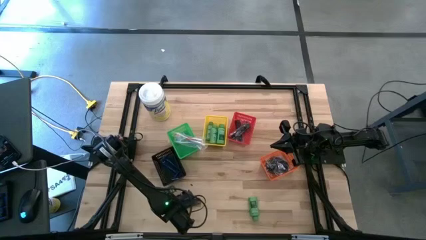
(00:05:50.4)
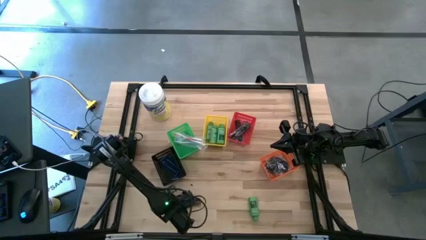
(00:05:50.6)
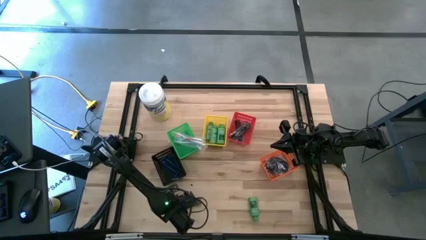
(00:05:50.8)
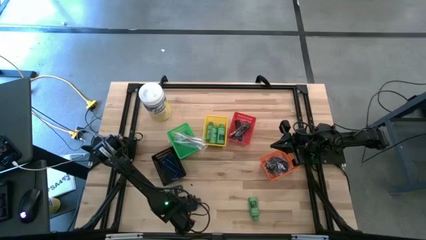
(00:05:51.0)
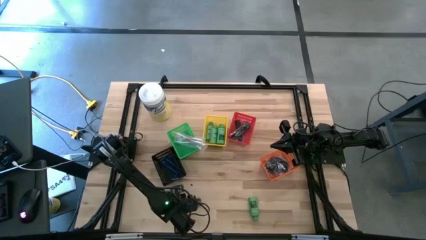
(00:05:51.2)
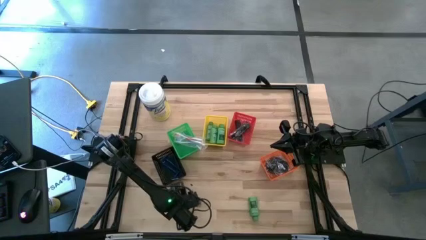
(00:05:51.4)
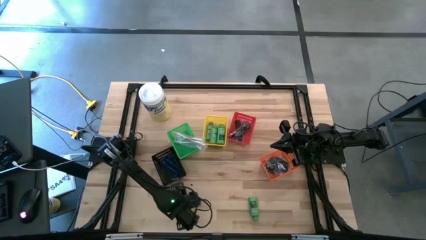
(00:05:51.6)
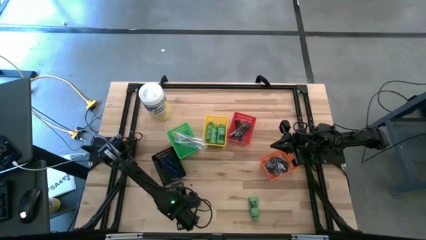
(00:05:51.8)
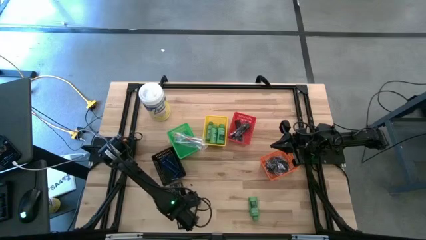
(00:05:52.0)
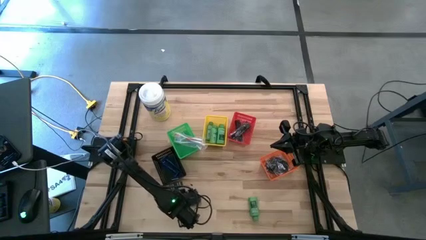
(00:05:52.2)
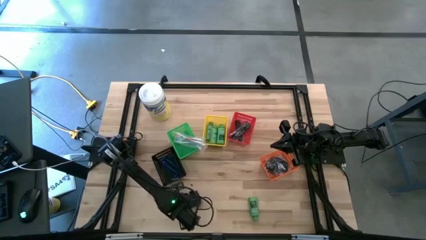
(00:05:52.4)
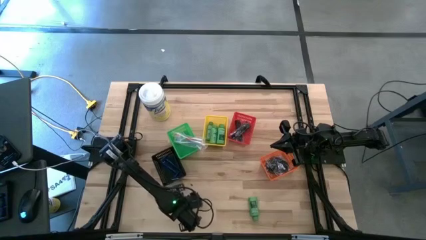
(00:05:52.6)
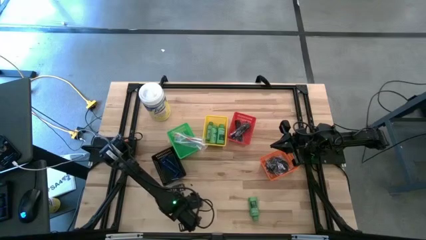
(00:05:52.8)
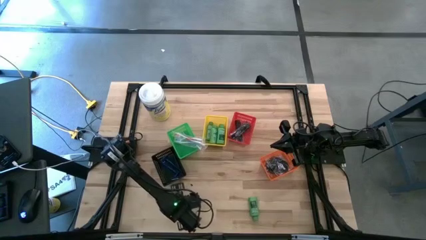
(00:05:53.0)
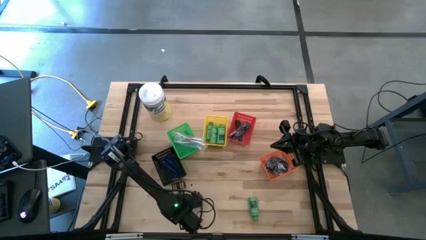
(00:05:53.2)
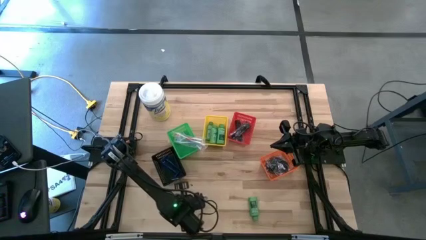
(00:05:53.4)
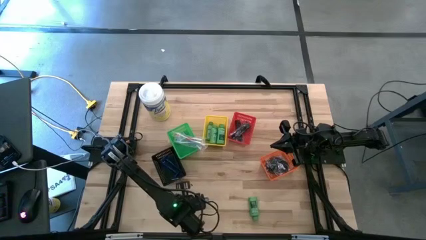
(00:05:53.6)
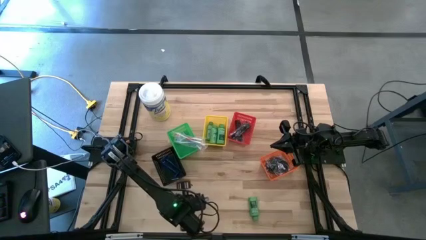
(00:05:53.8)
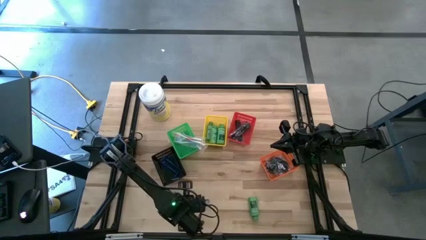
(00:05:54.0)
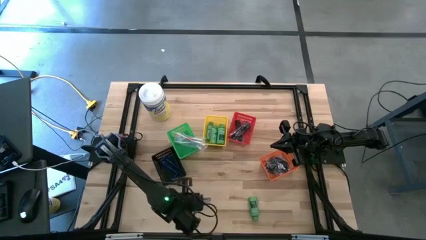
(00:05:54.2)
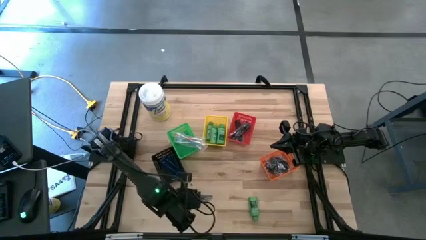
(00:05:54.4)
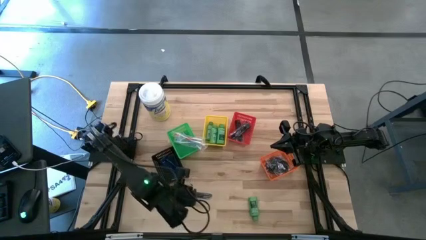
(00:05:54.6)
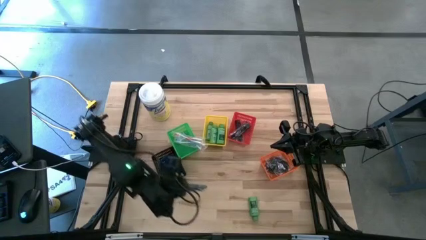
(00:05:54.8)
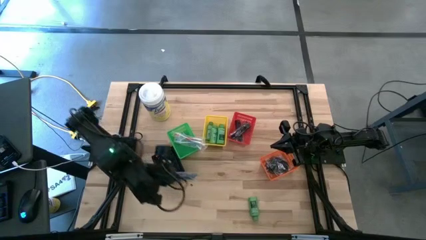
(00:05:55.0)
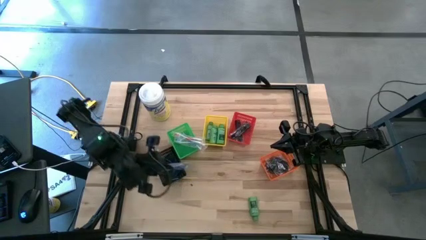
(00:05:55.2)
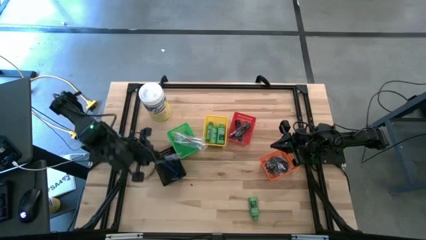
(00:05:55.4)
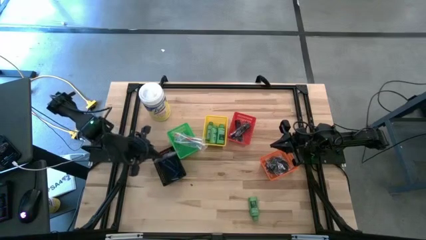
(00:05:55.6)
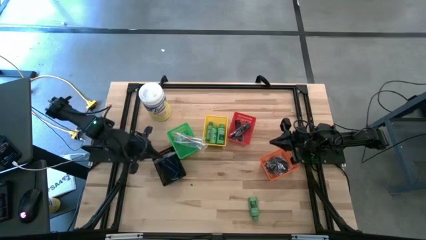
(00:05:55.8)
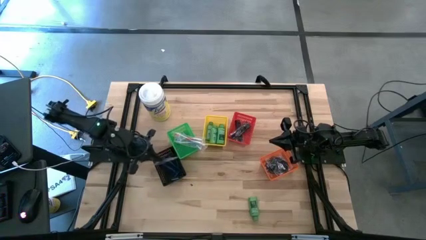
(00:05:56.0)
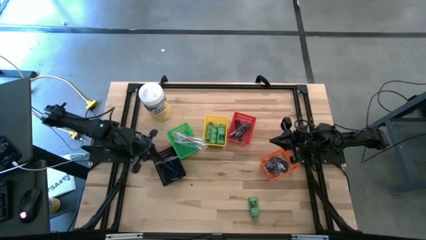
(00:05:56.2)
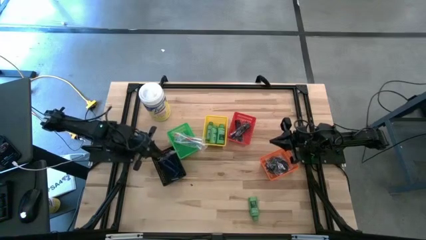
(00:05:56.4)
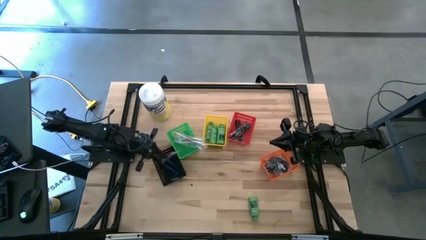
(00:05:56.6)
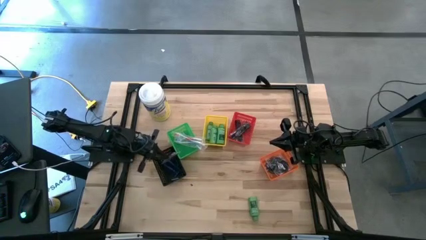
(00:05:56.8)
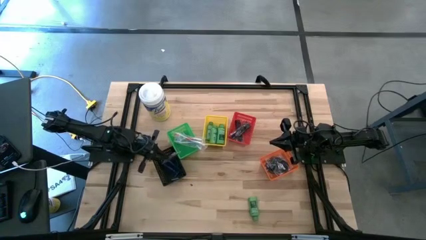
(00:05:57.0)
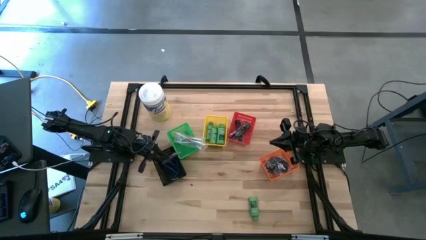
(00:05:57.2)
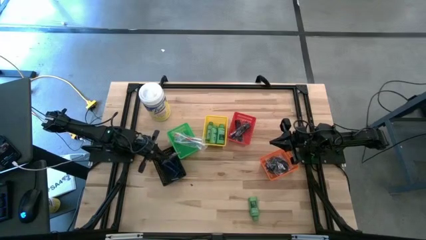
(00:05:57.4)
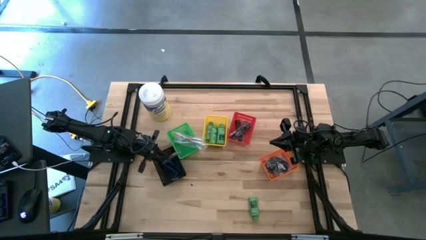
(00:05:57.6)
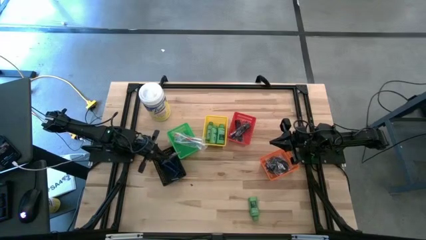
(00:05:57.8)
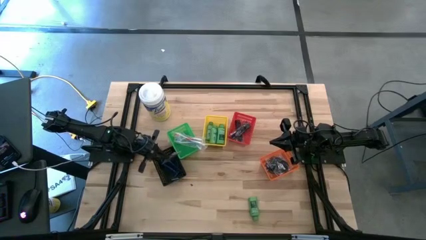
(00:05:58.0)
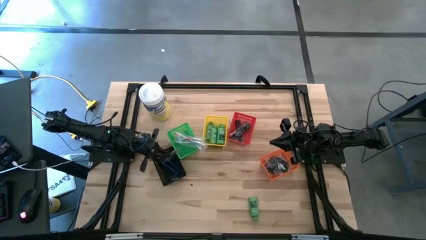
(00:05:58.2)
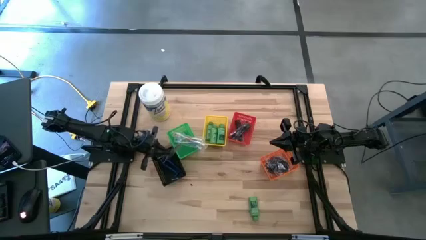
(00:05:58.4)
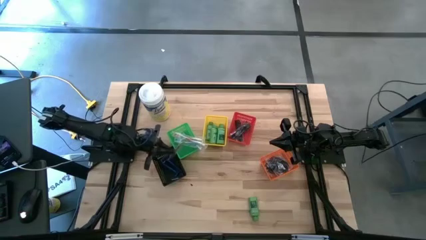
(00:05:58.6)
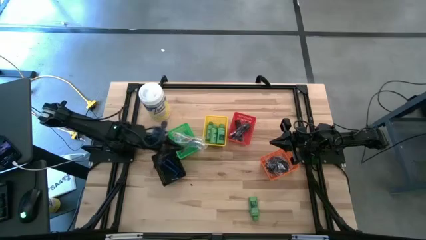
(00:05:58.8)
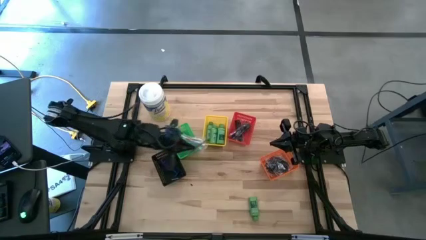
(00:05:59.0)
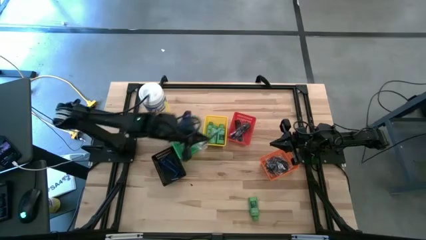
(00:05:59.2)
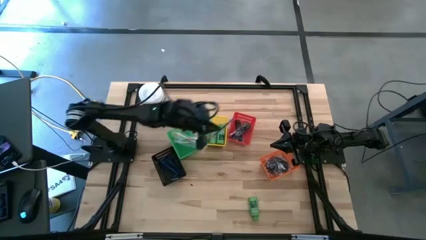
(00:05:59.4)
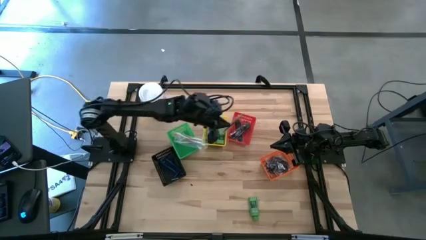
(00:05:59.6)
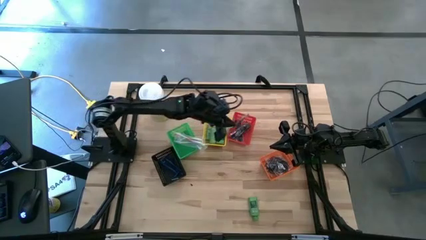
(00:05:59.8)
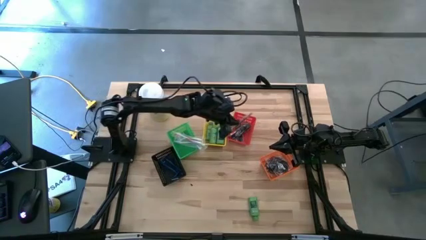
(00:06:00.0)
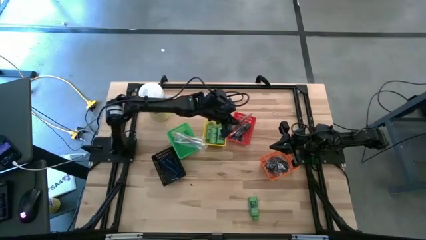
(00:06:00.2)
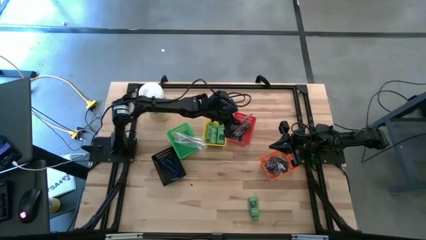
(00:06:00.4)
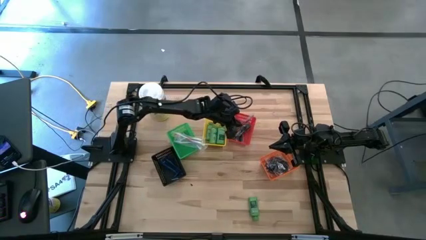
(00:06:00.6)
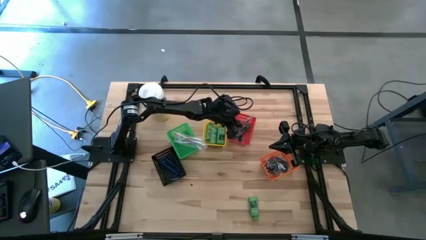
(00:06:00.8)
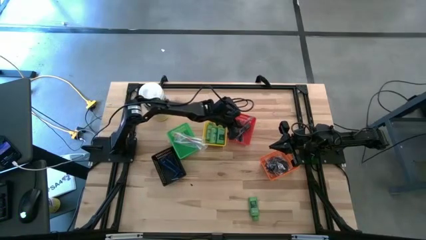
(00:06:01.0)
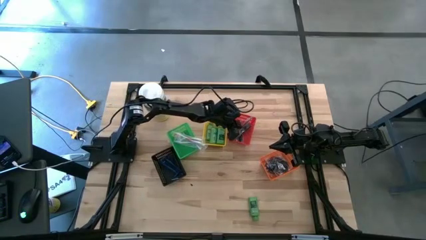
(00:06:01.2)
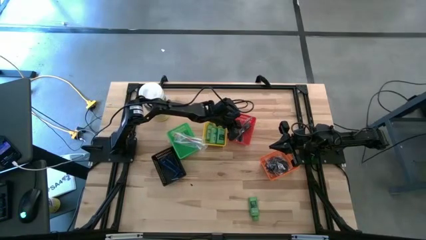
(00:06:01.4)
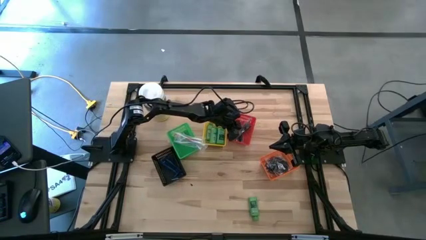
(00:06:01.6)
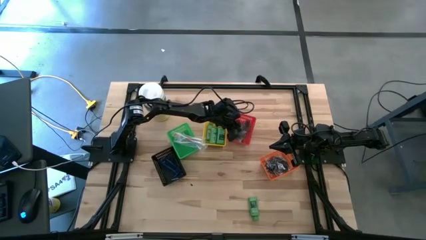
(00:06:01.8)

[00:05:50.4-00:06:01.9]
Task: Pick & Place Travel size toiletries
Put the black comb into the red bin
